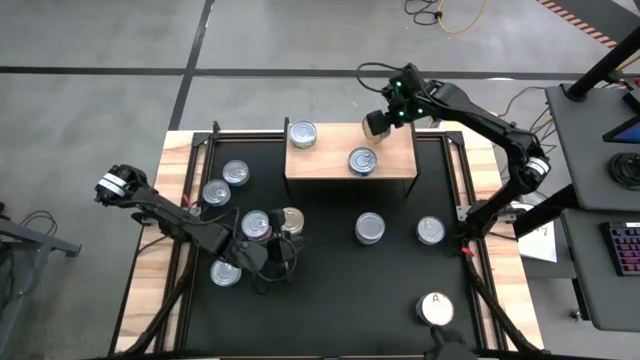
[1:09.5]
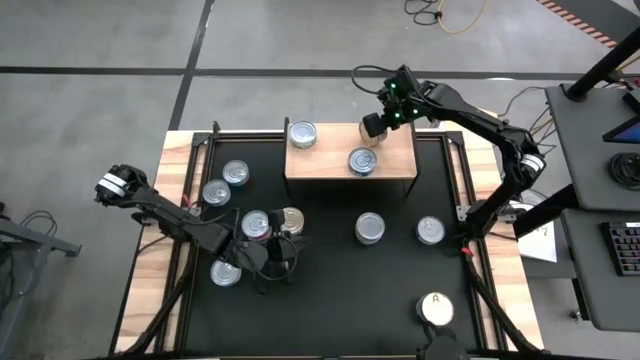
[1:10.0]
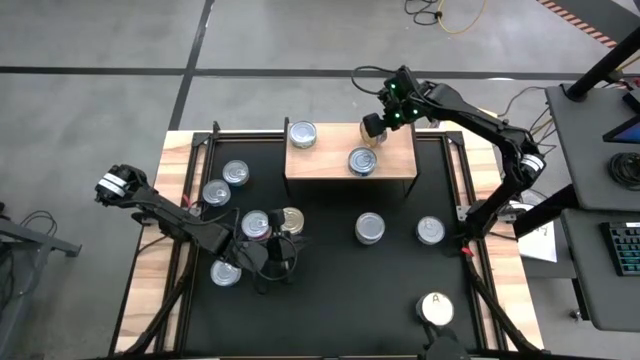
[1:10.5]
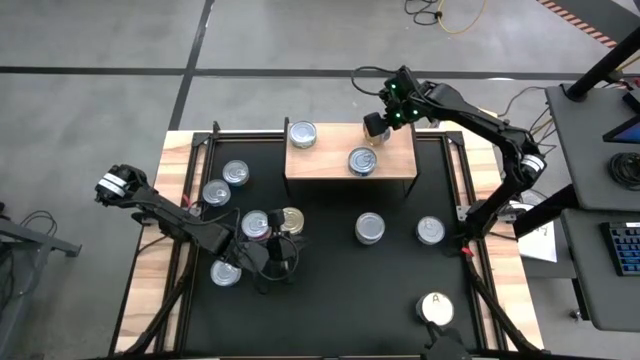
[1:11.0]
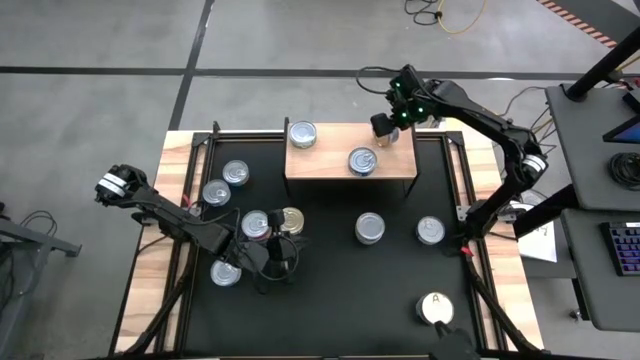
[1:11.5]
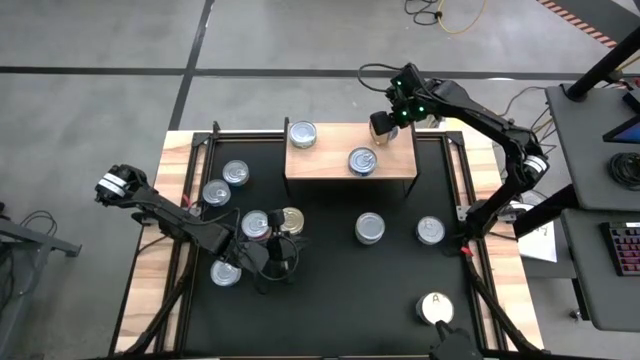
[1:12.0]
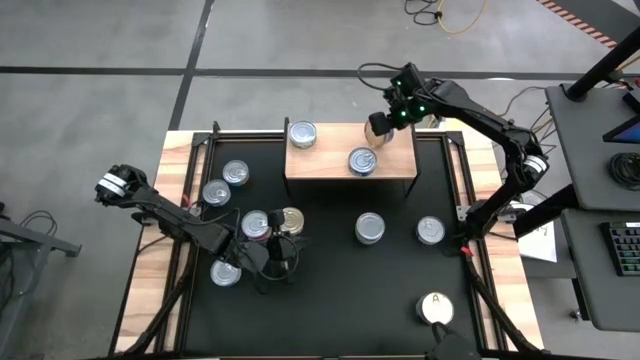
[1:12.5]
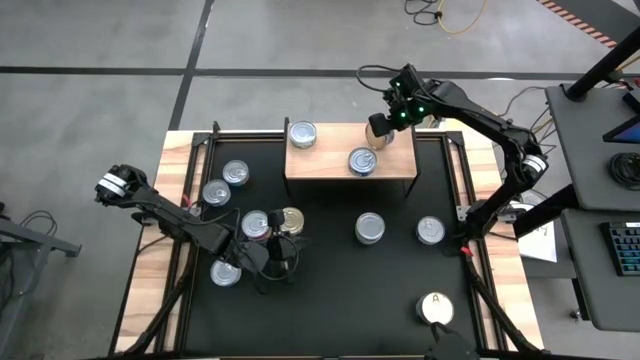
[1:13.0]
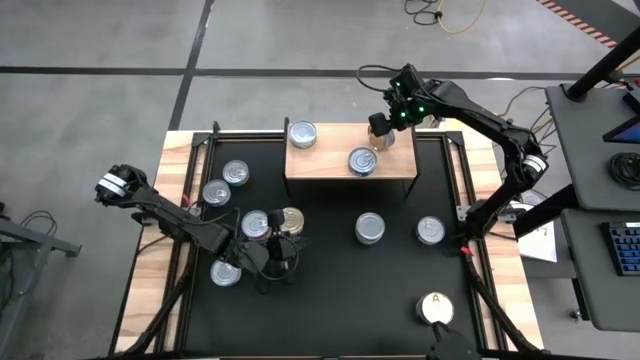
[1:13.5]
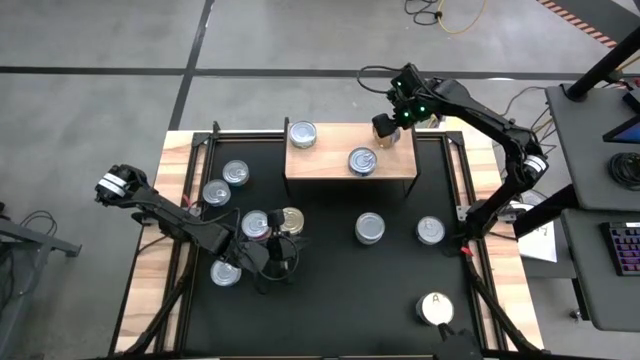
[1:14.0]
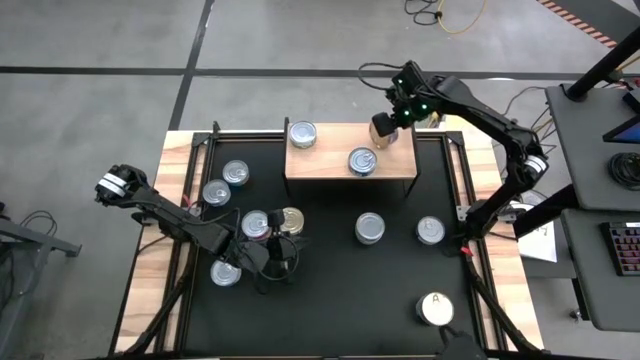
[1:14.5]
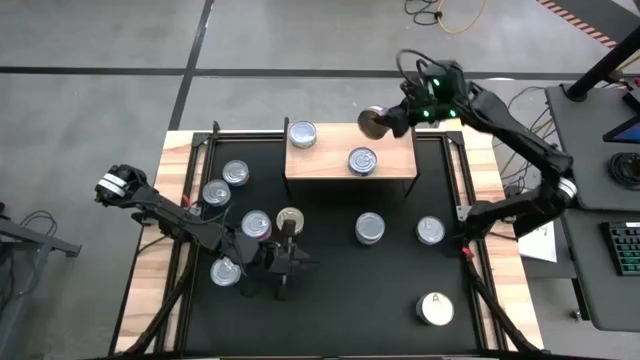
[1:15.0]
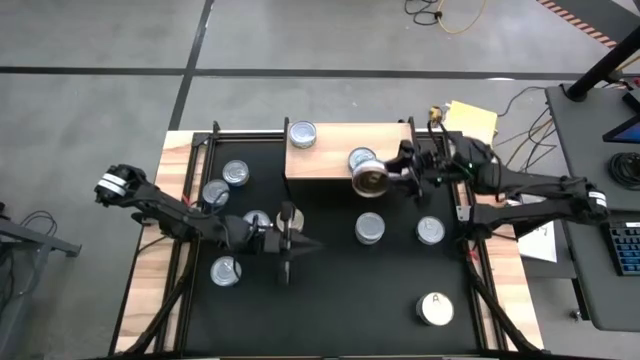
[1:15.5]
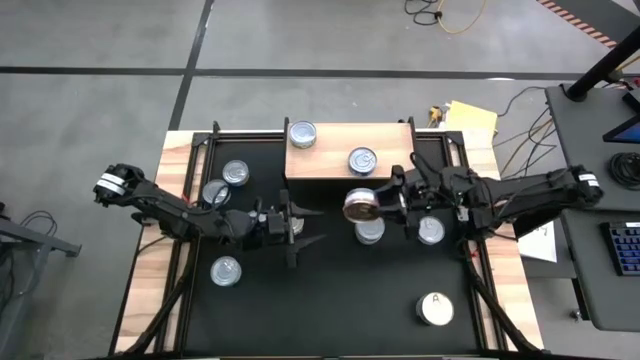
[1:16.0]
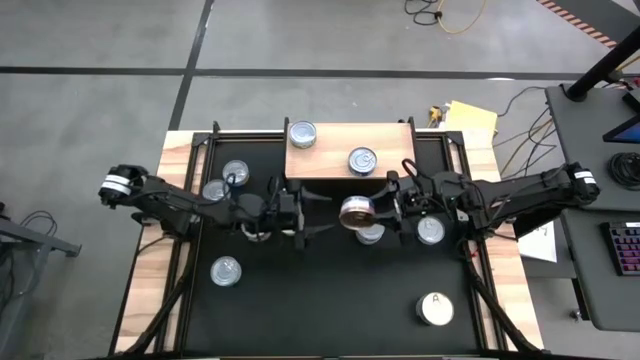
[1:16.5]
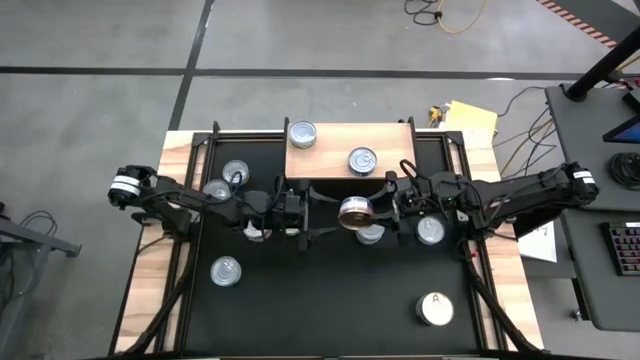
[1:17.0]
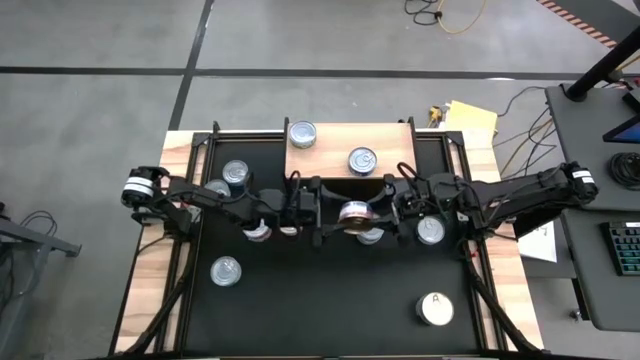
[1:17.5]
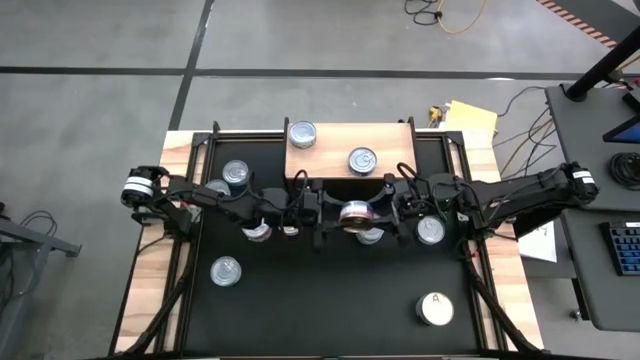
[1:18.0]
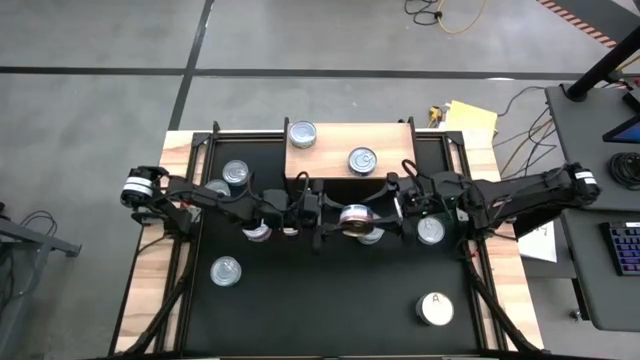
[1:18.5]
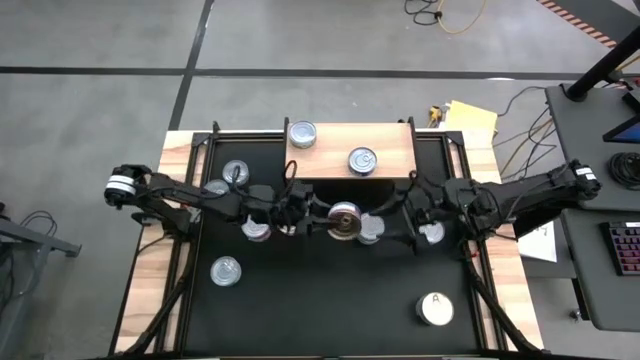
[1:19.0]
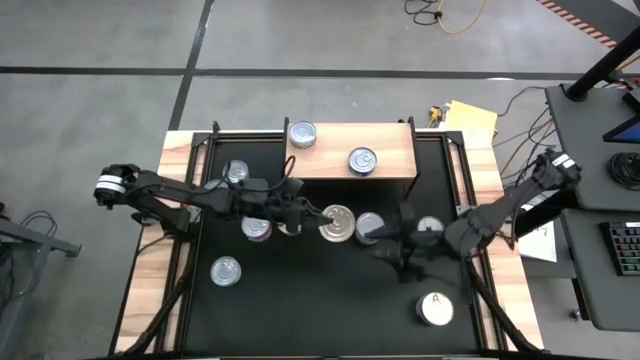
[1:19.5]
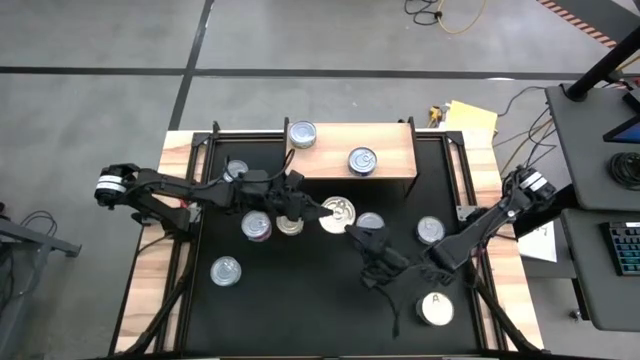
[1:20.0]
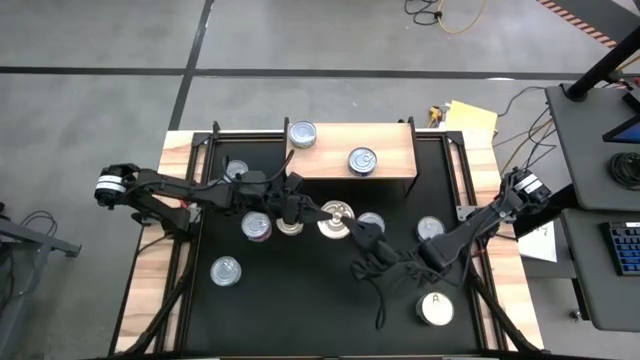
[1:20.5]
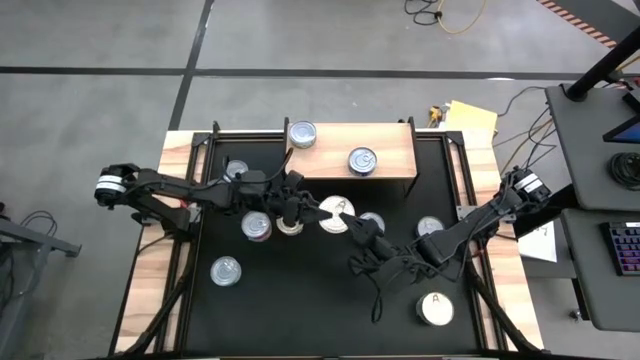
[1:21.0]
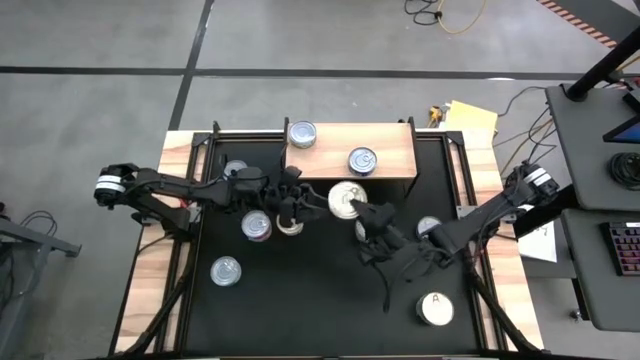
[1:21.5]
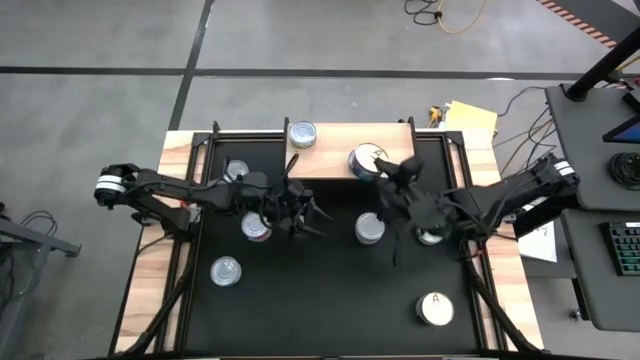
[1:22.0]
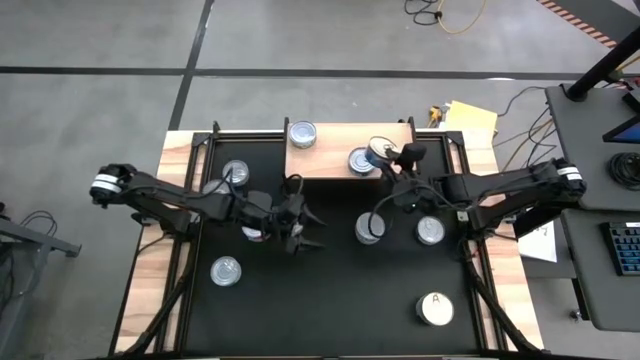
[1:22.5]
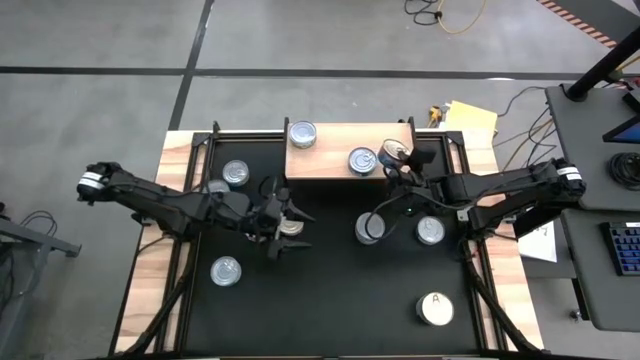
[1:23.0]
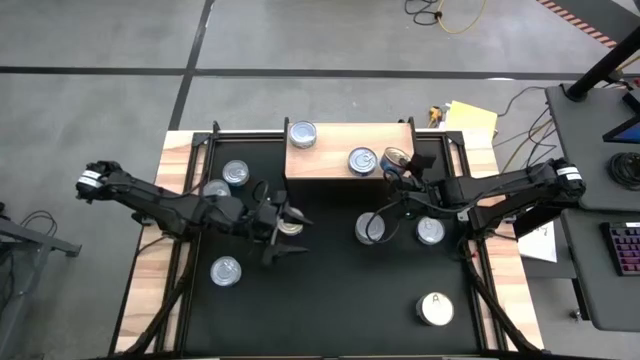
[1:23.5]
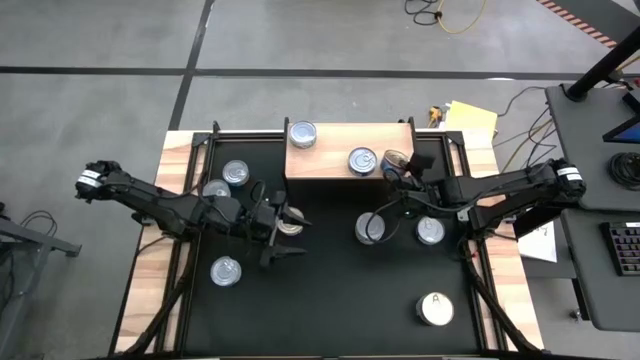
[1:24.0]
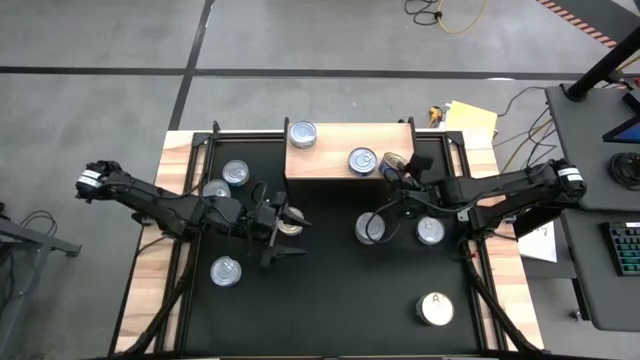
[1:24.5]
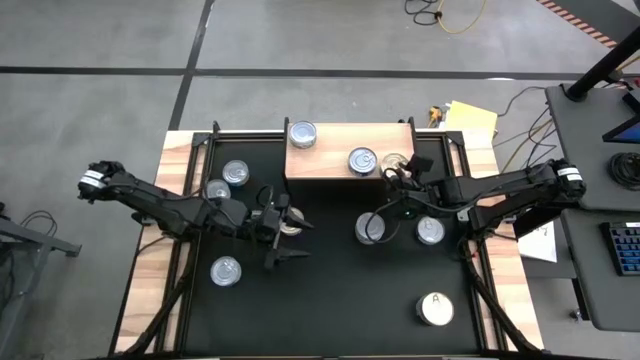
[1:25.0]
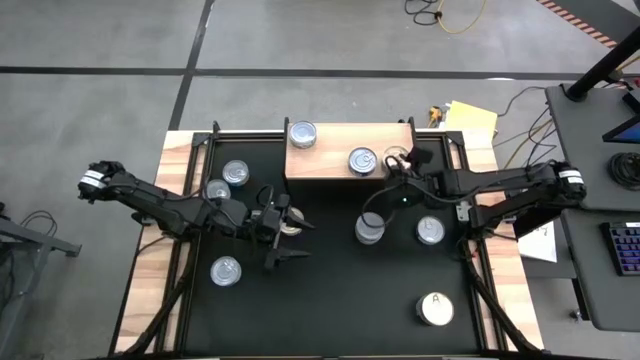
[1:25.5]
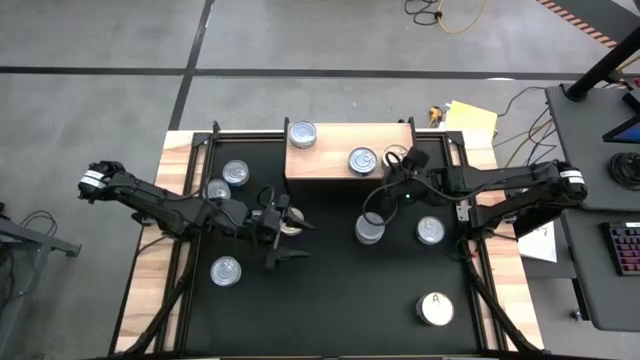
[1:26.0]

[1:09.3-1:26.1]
Task: Stack canned seafood by type on shelf
Put the blue pink tuna can on the shelf

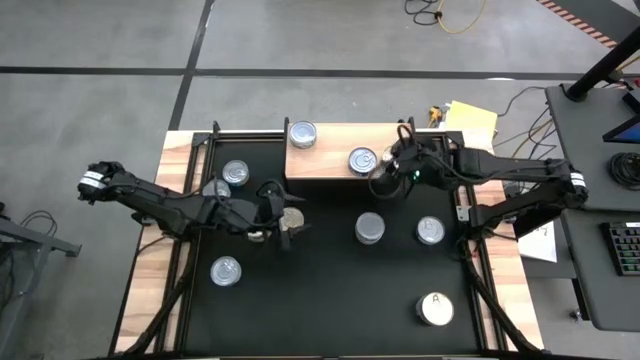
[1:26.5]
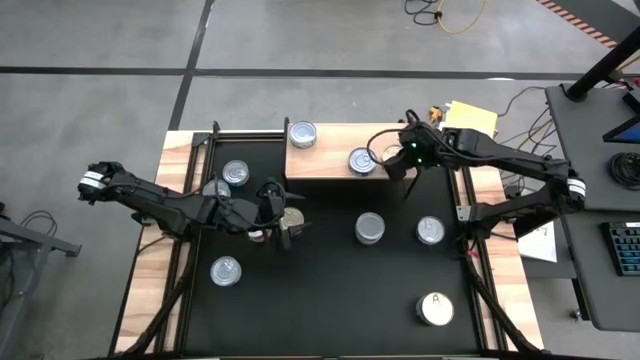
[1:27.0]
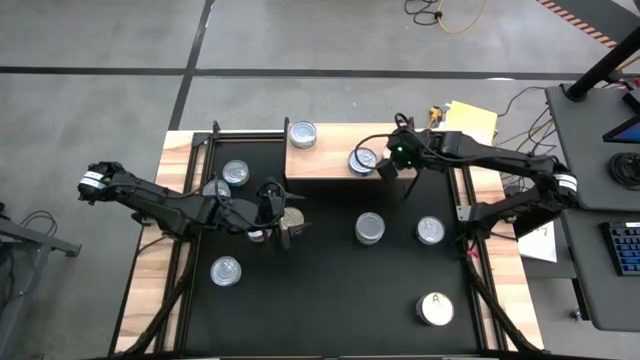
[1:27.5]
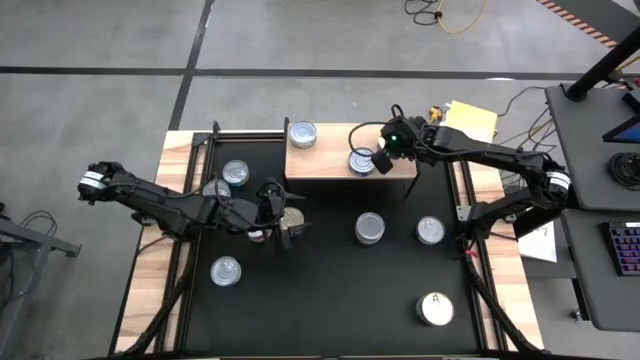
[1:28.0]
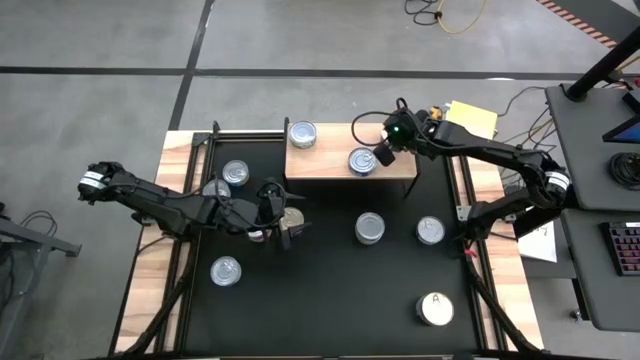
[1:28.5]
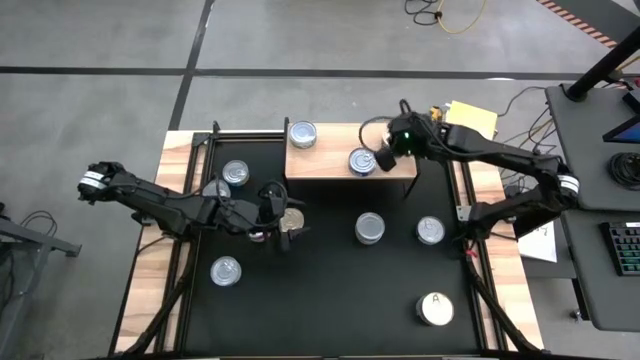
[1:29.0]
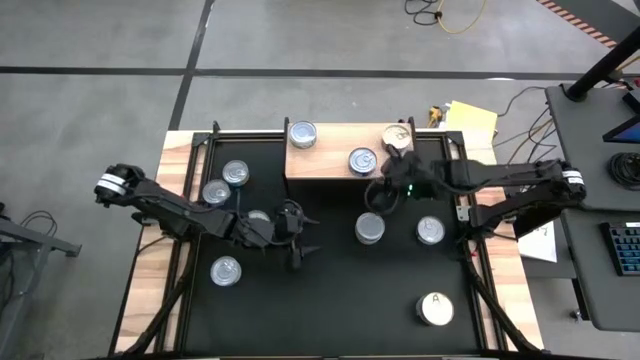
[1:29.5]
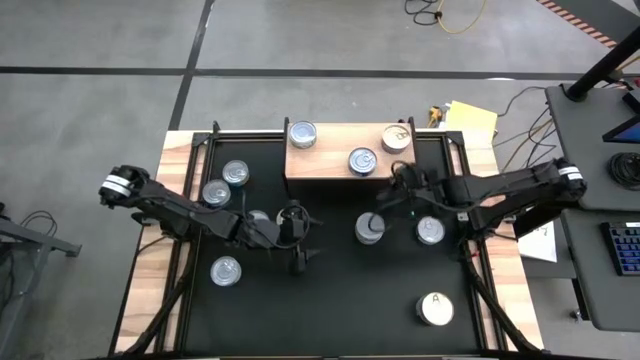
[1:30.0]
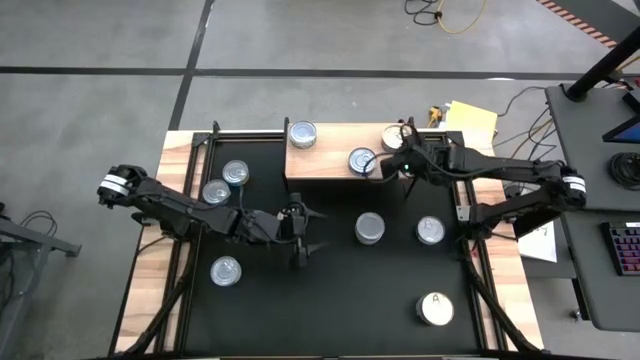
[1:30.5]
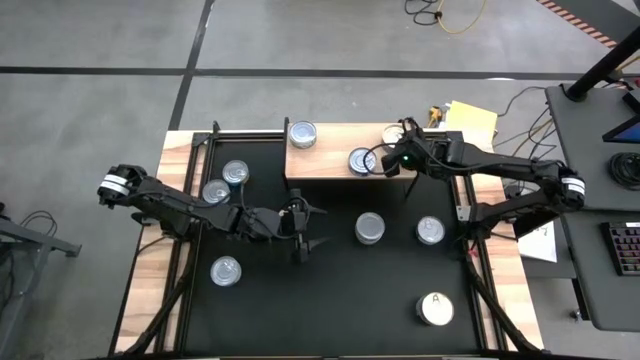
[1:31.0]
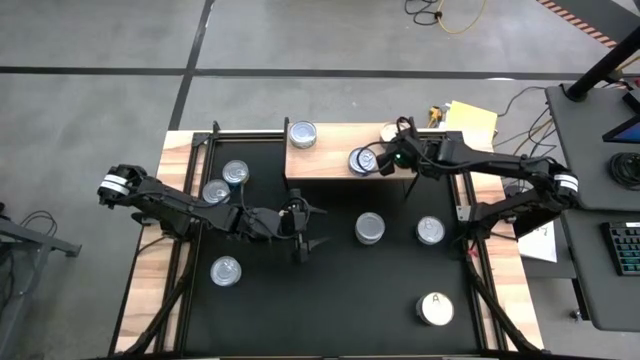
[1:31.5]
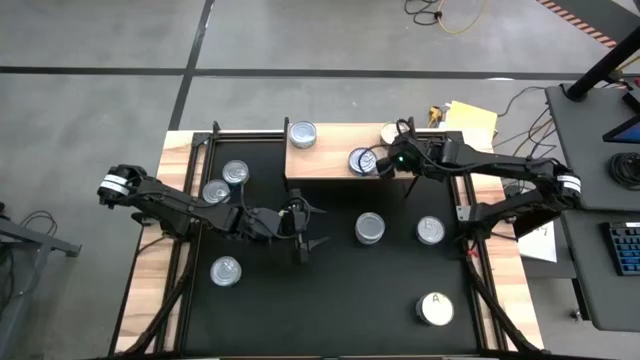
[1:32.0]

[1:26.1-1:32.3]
Adjust the blue pink tuna can on the shelf
